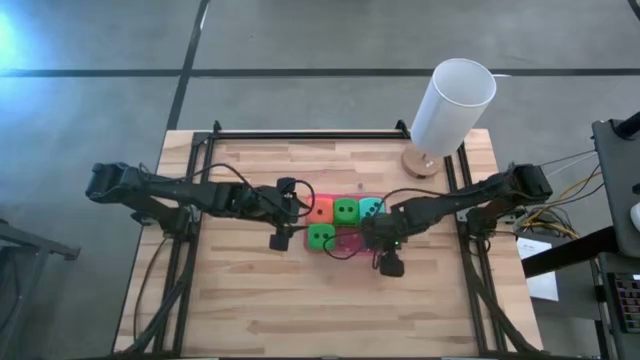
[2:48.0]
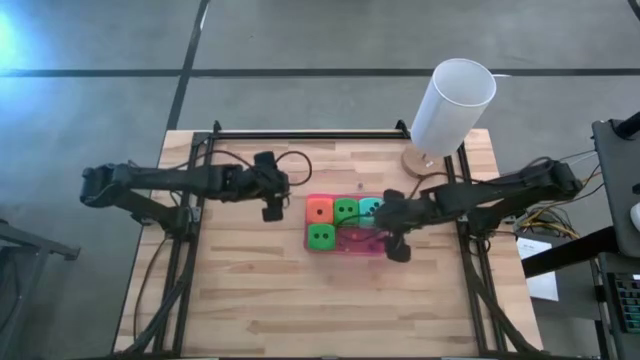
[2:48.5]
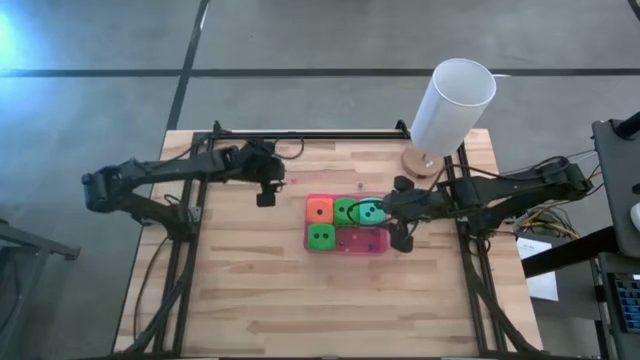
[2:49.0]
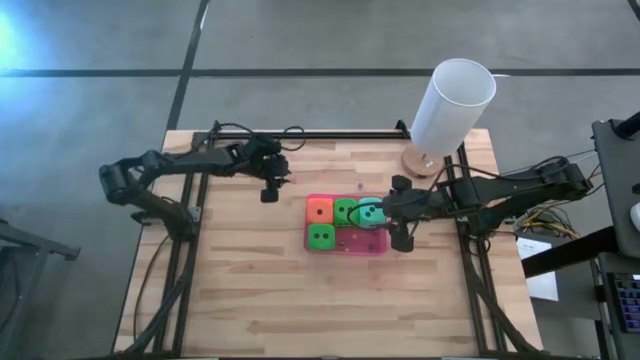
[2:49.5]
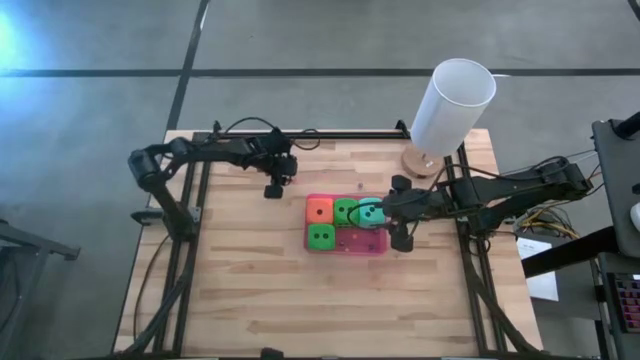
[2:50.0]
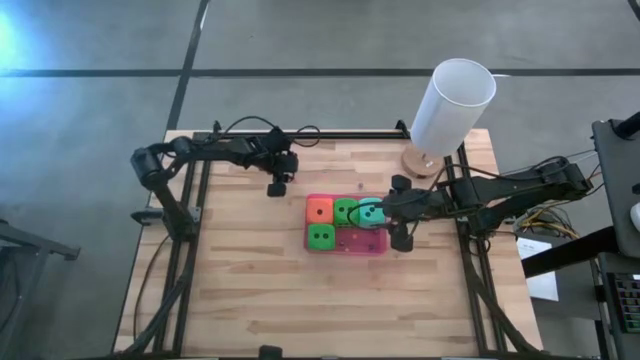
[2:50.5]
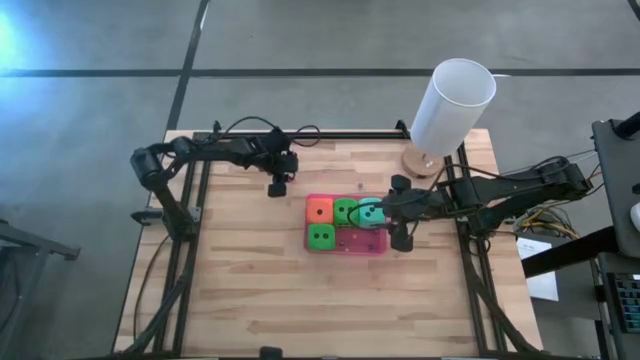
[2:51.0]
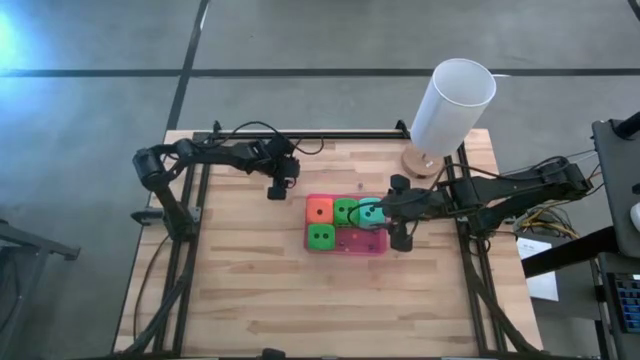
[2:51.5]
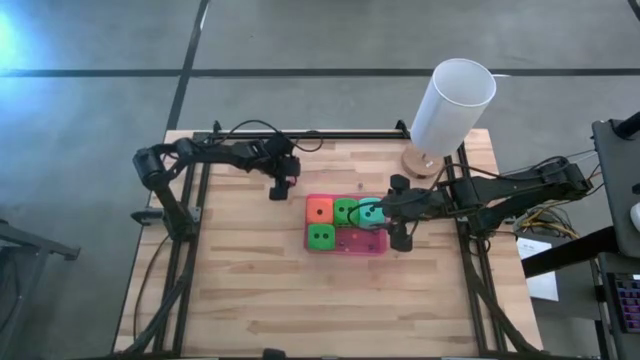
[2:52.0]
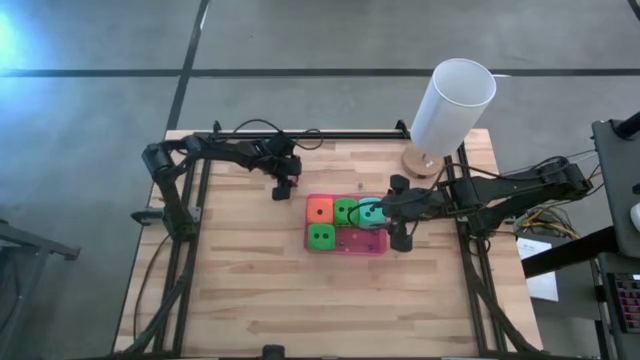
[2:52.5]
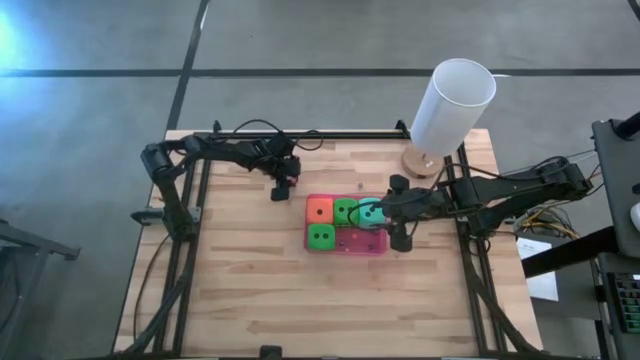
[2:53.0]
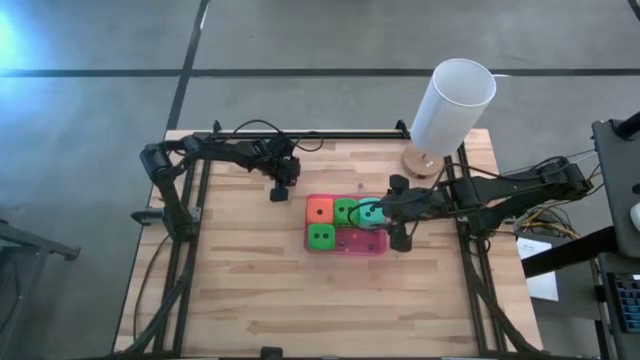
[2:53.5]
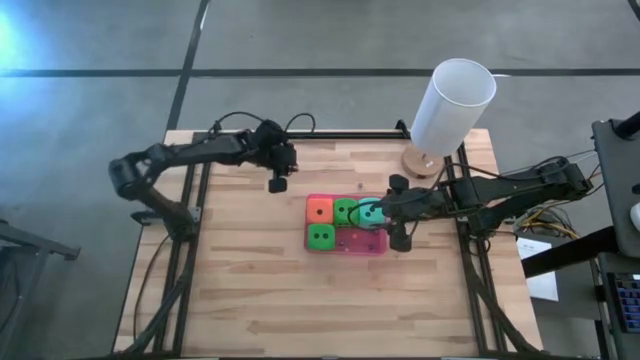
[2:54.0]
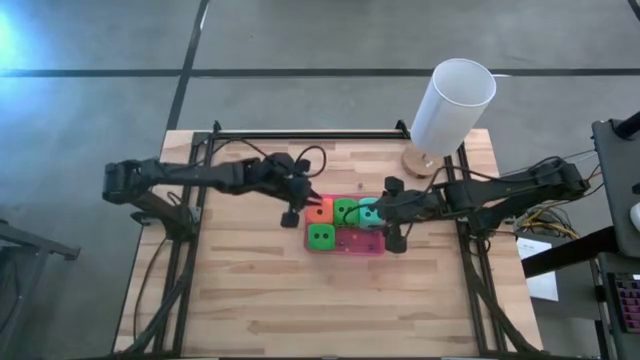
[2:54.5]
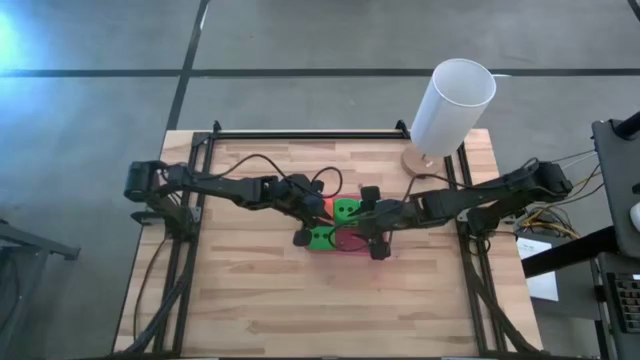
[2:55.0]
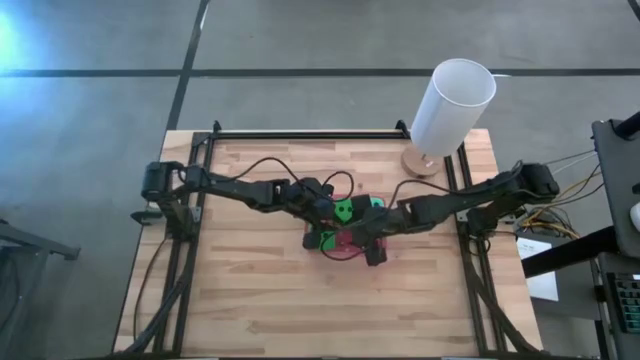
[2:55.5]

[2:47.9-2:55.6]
Task: Pick & Place Dice
Put the small pink die into the pink bin

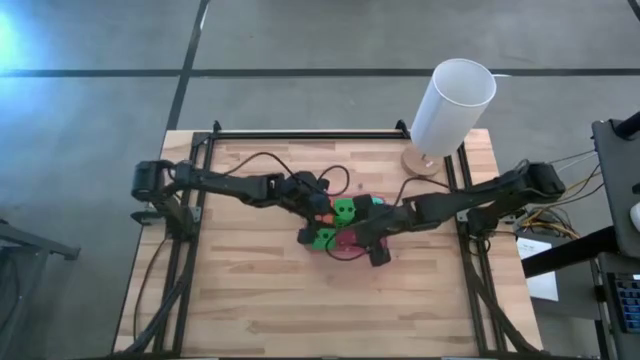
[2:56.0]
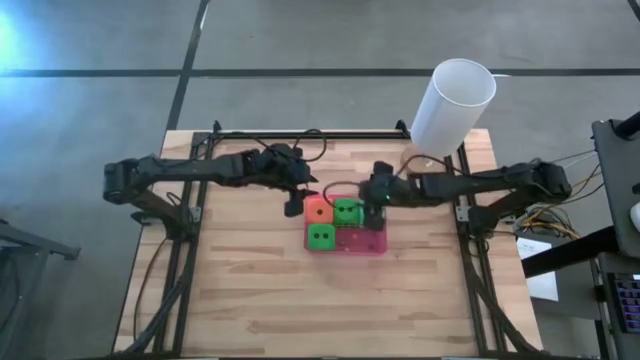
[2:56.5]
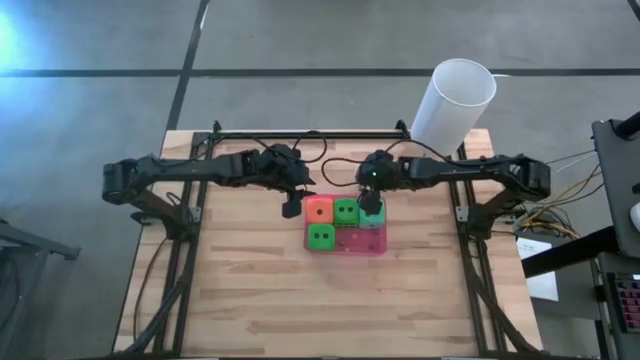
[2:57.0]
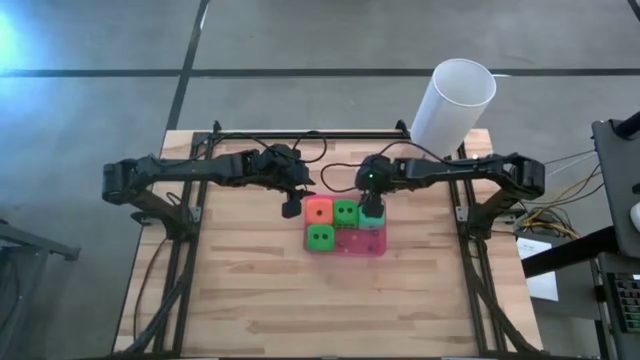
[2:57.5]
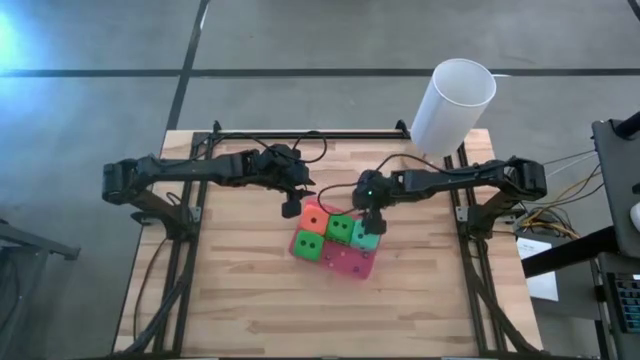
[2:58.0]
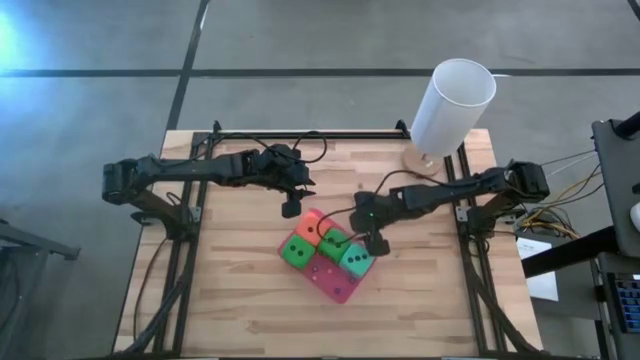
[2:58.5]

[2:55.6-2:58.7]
Adjust the pink bin

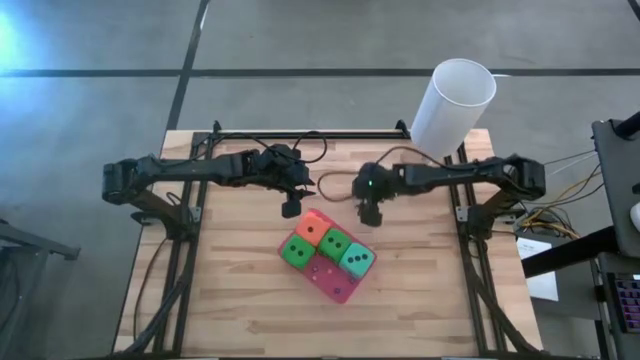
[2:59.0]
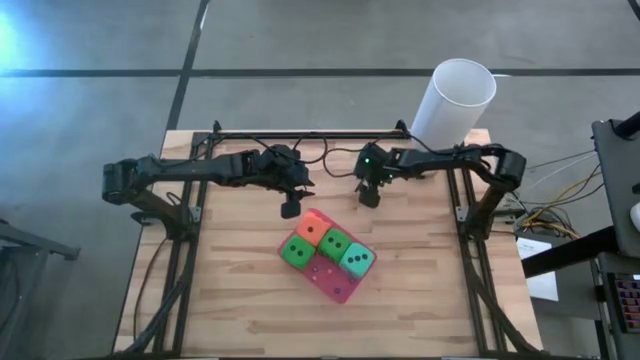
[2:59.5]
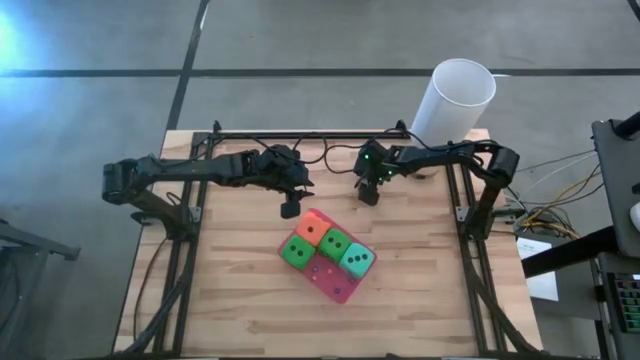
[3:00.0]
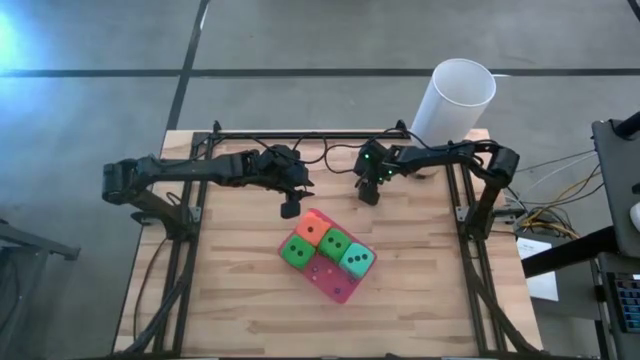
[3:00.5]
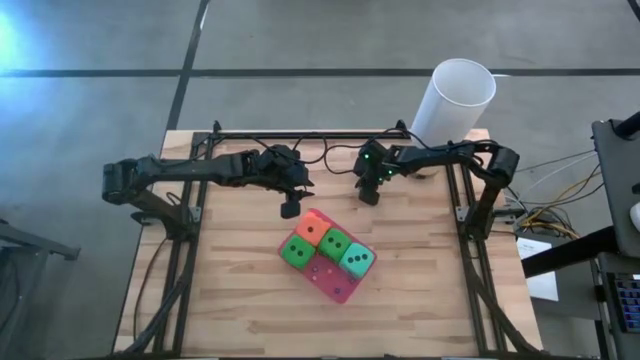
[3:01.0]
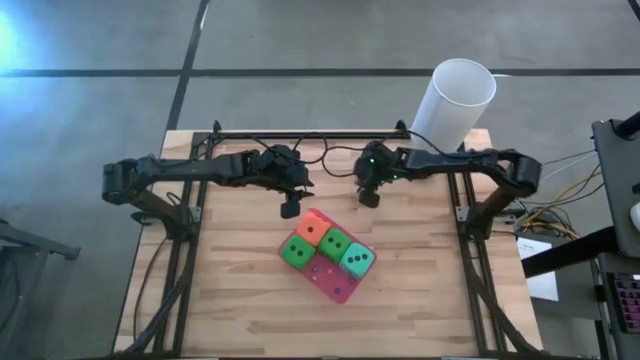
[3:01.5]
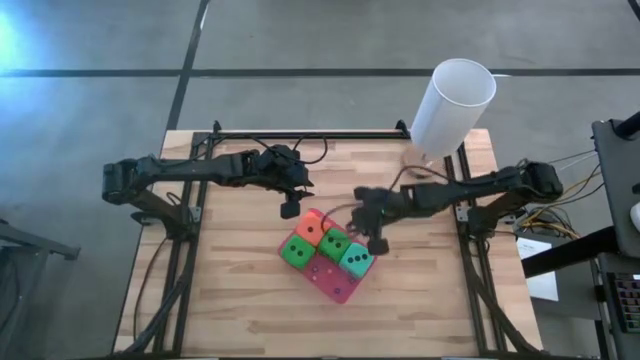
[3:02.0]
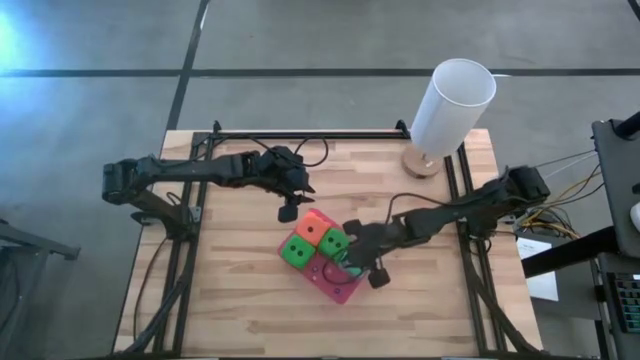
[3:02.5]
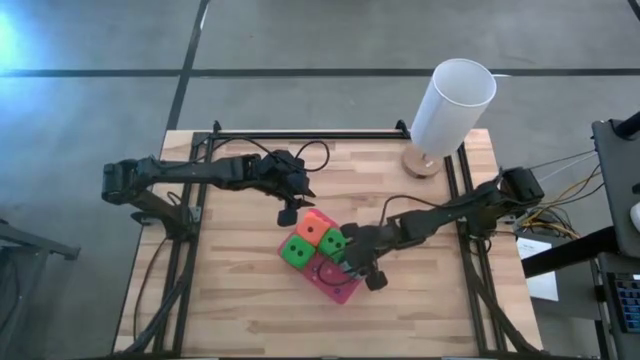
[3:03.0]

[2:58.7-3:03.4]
Put the small purple die into the pink bin

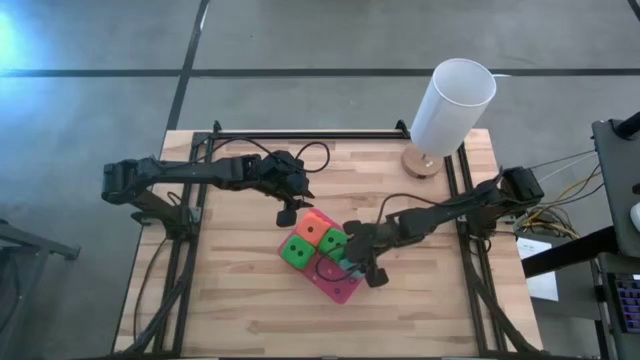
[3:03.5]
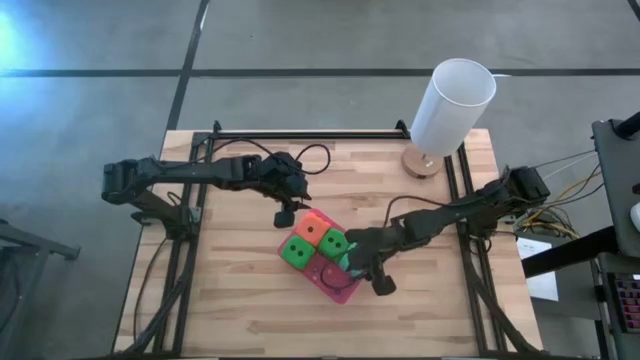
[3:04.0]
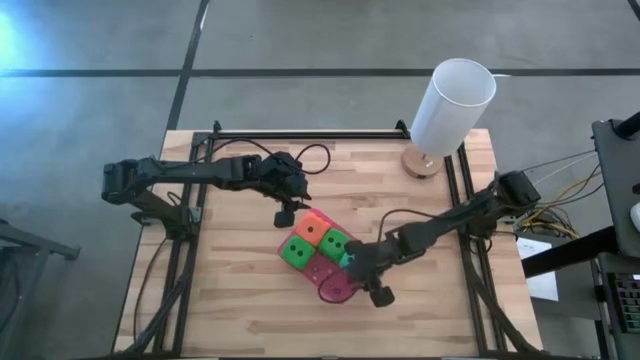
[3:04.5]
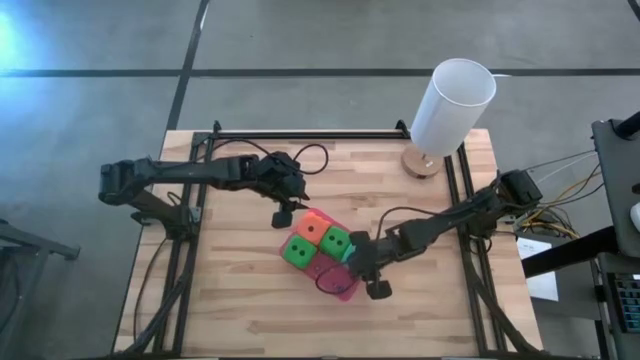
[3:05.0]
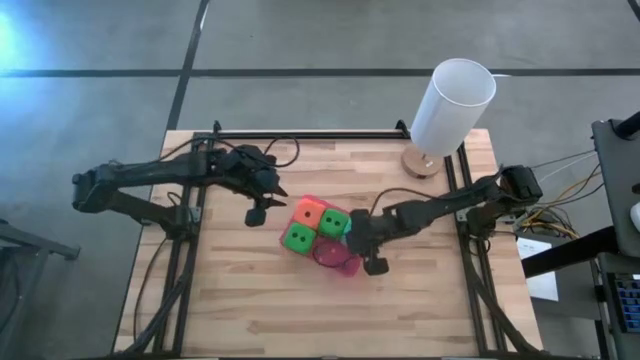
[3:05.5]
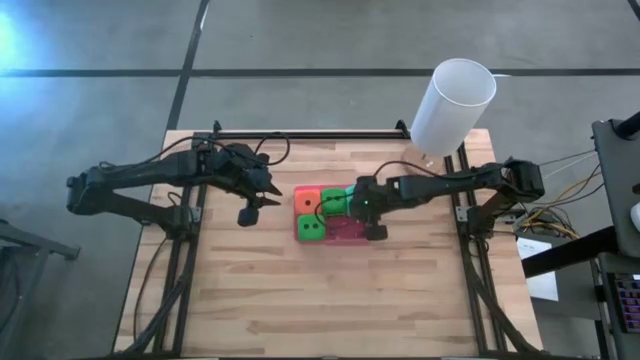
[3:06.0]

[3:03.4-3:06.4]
Adjust the pink bin

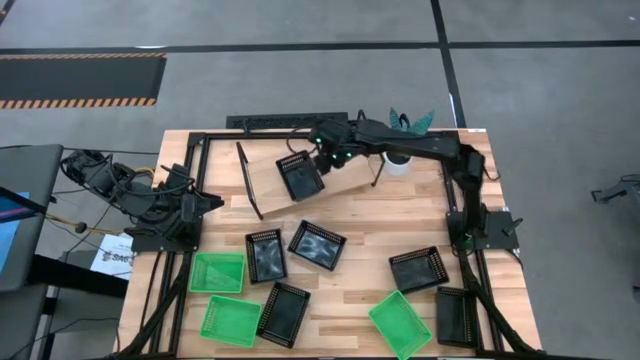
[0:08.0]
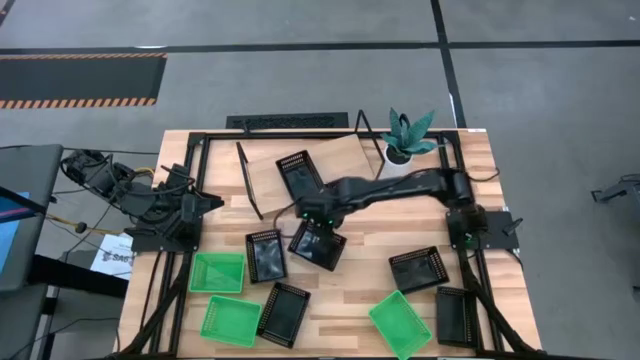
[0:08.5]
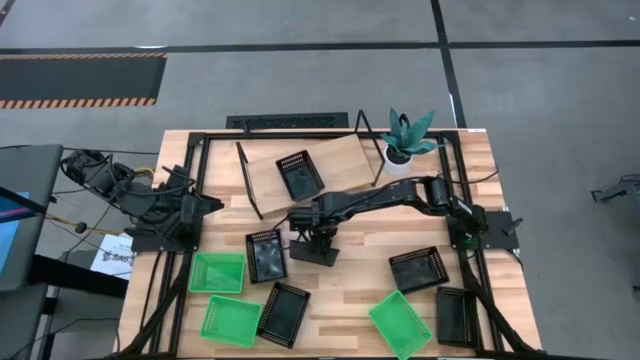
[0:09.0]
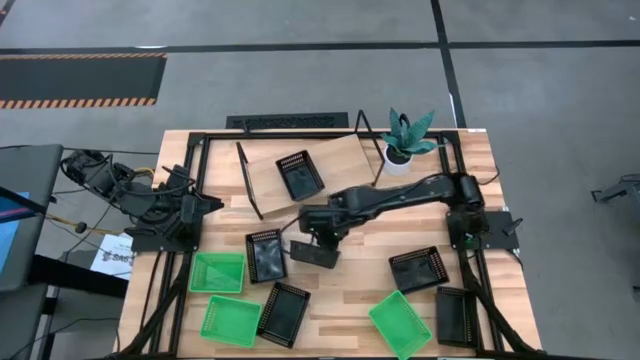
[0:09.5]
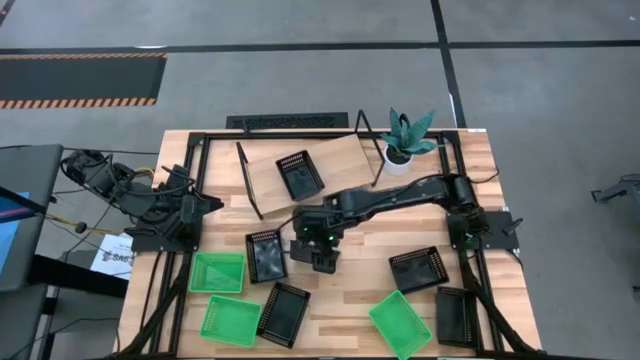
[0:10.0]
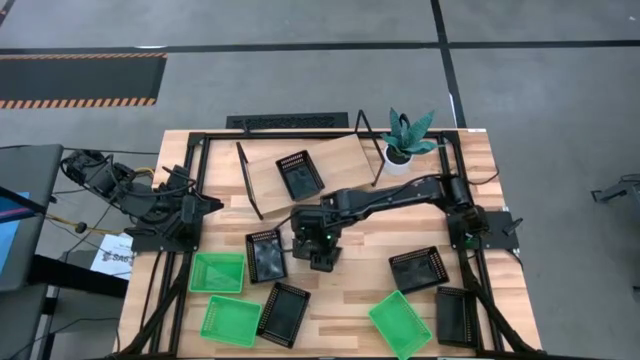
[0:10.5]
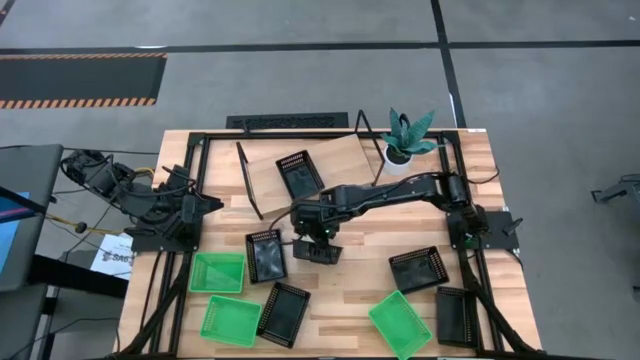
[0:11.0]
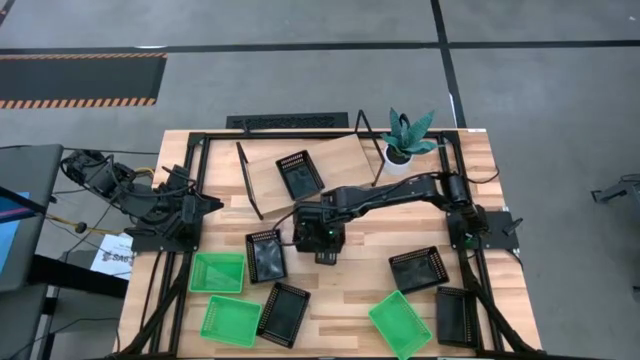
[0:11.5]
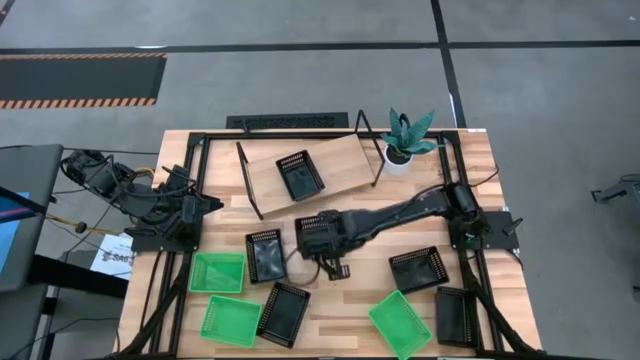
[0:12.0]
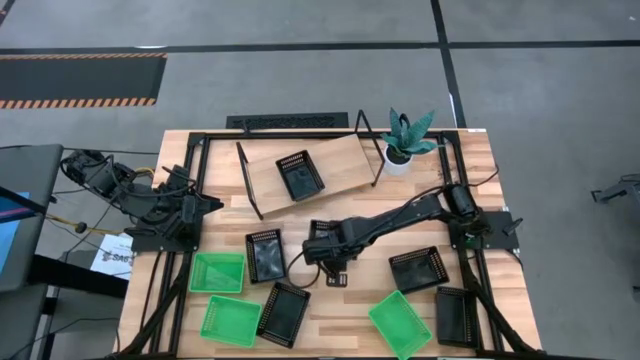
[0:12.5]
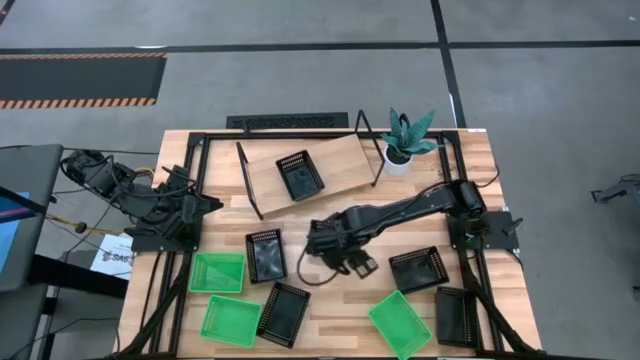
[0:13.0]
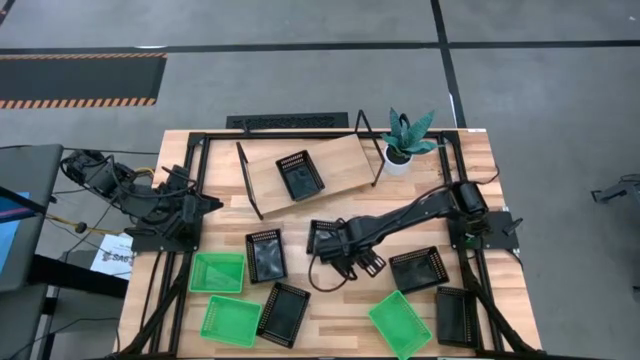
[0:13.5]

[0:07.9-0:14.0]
Task: Stack baskets on shelf by color
Stack the black basket on the black basket on the shelf
